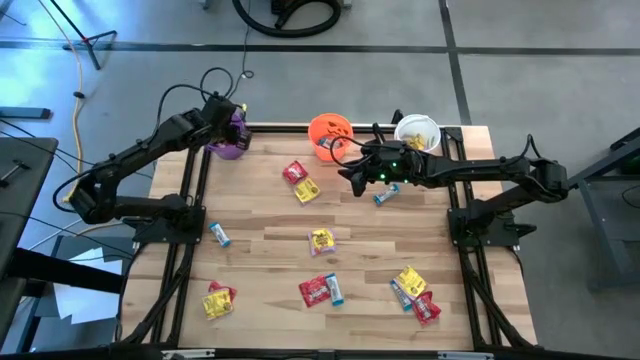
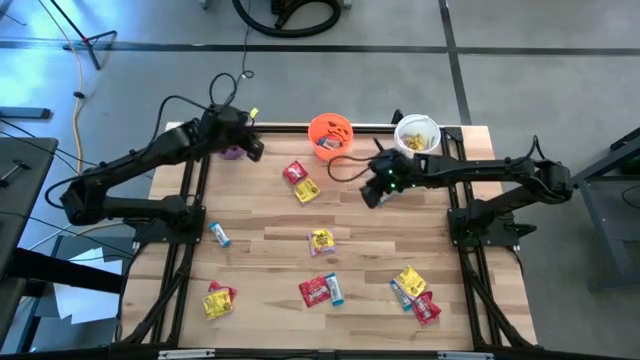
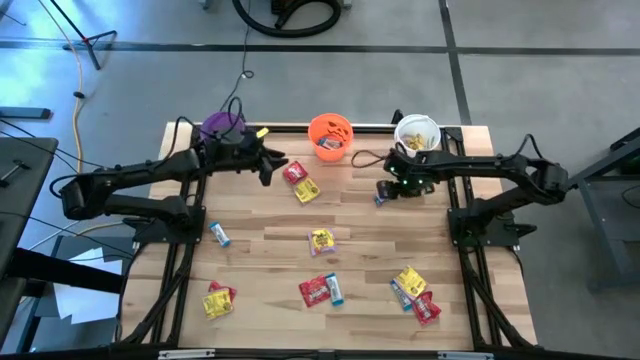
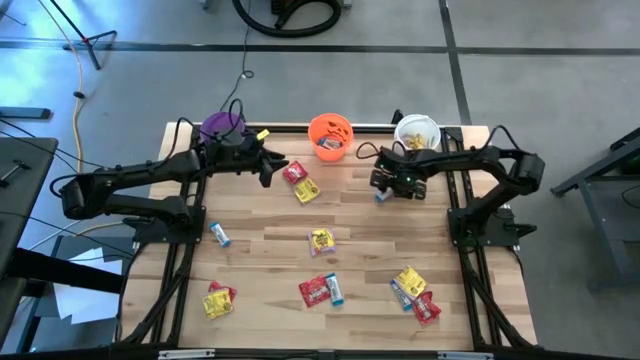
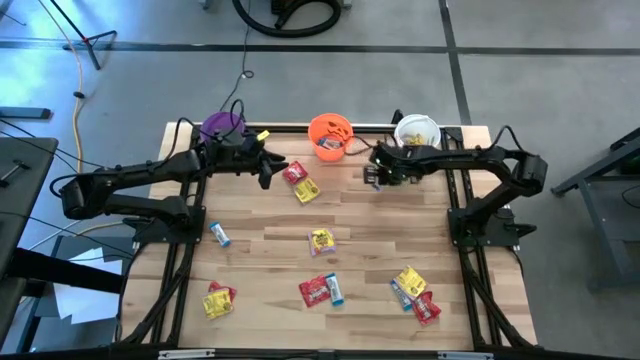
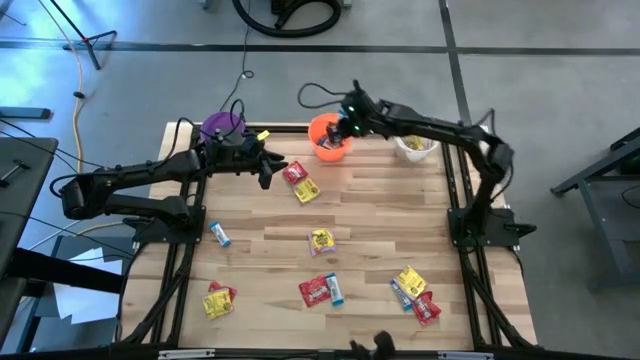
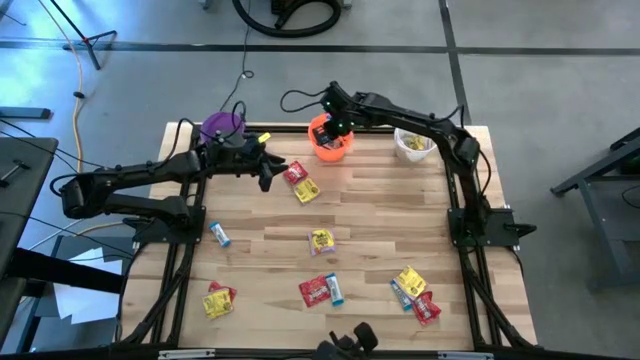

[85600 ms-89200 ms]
Task: Organize candy in baskets
Put the white chocolate into the orange bucket

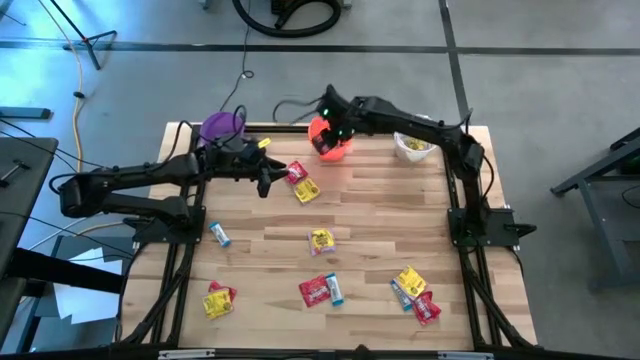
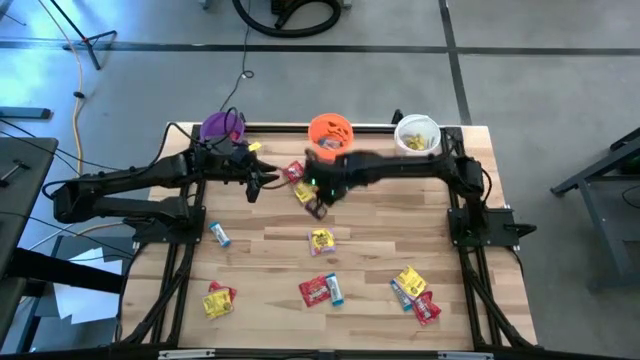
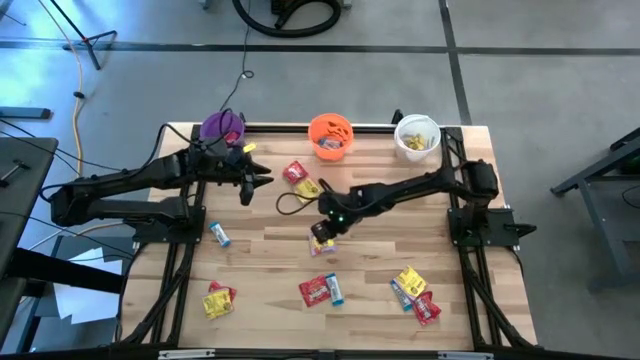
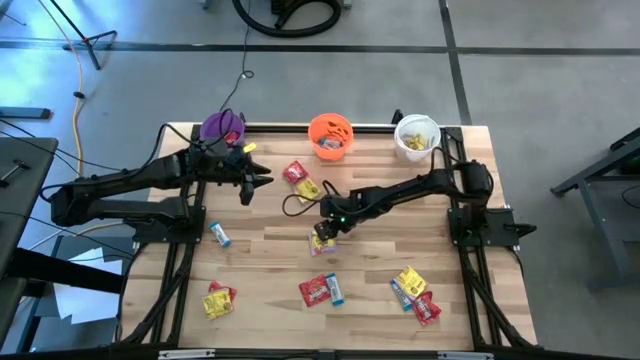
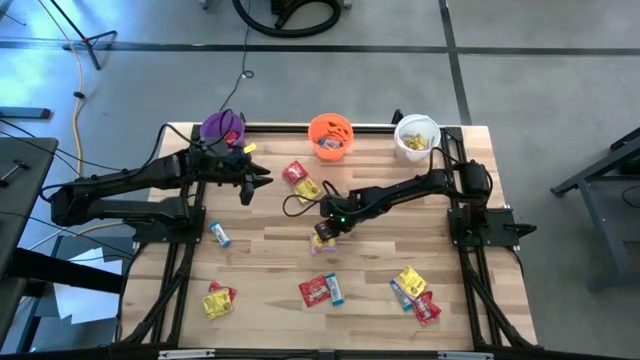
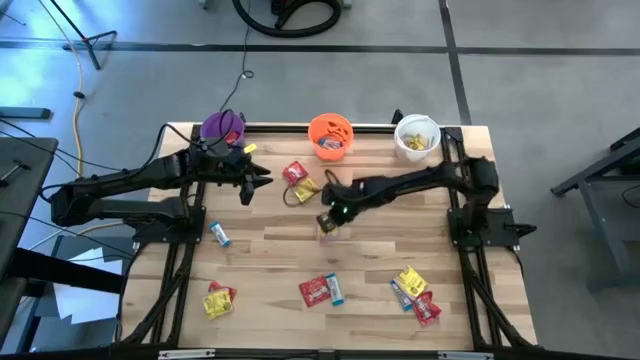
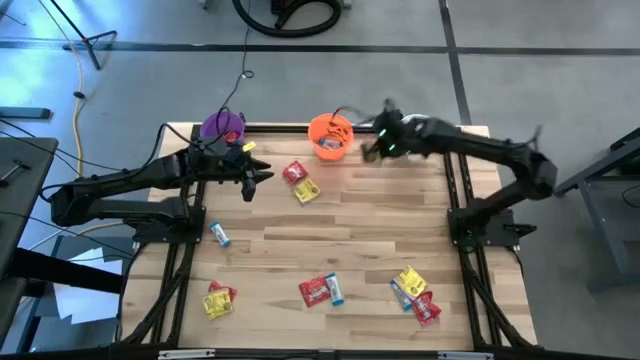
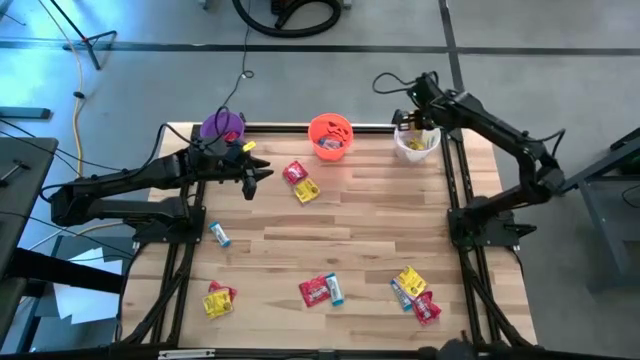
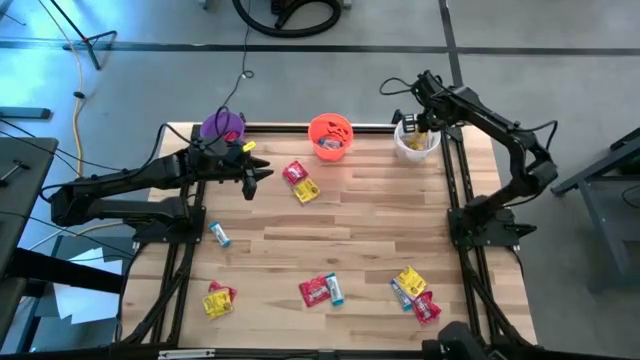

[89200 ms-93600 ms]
Put the yellow candy into the white bucket

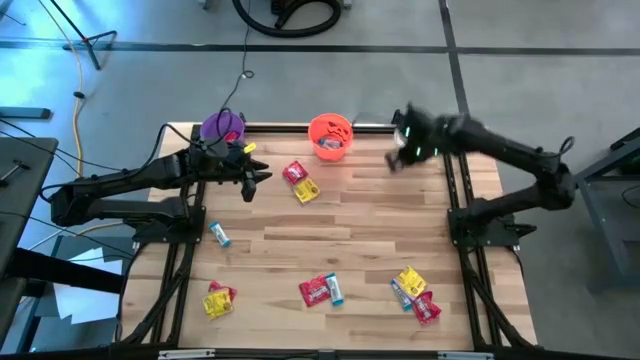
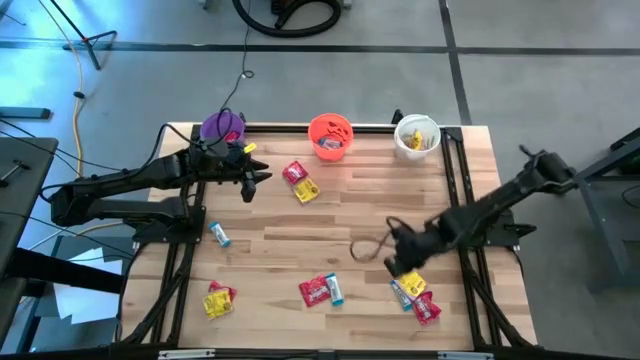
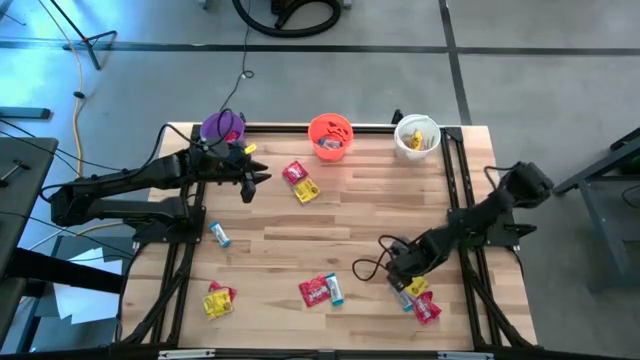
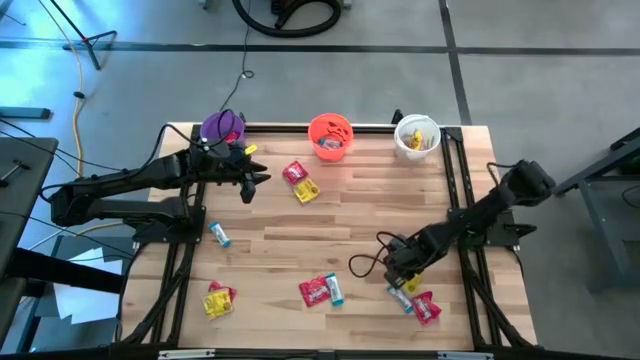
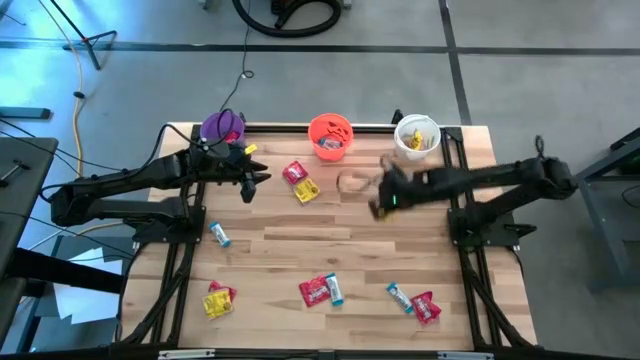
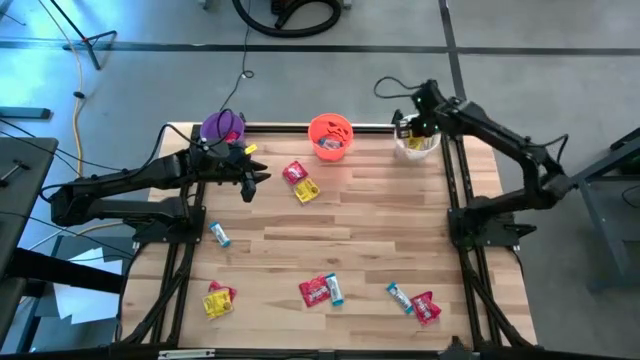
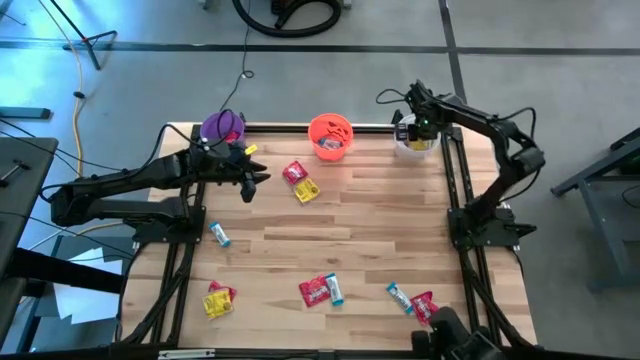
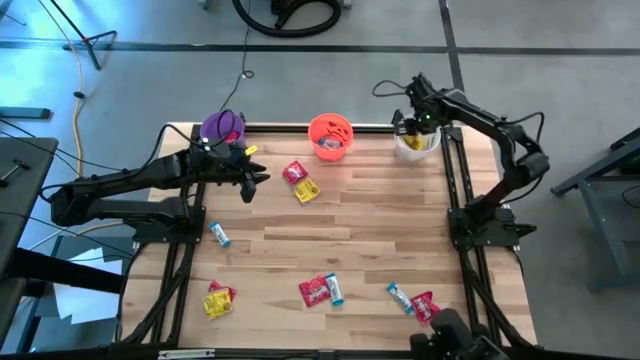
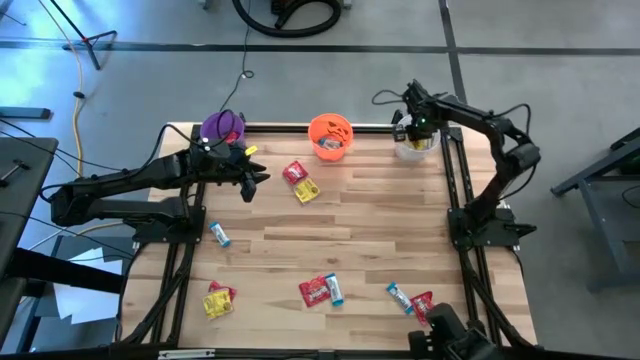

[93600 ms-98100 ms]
Put the yellow candy into the white bucket

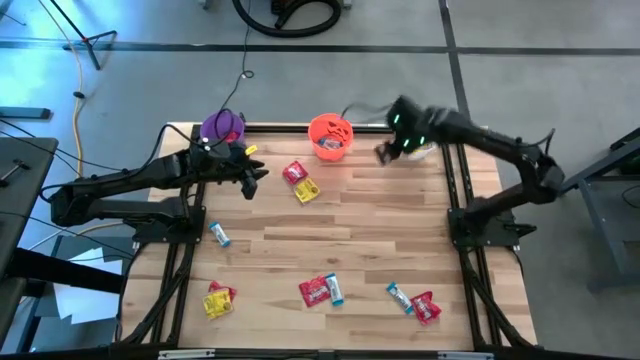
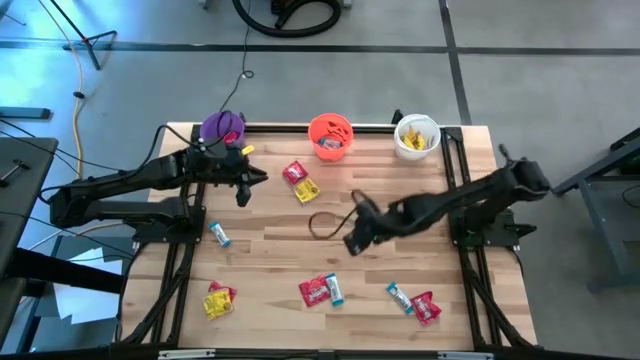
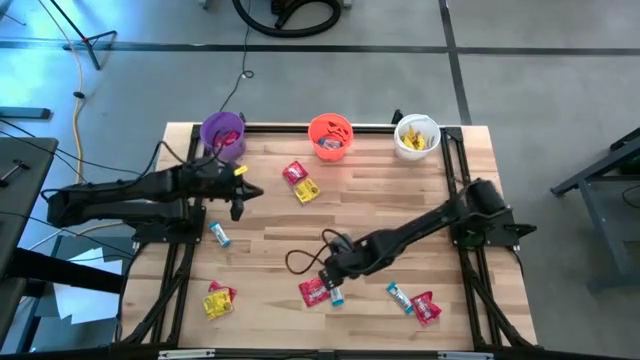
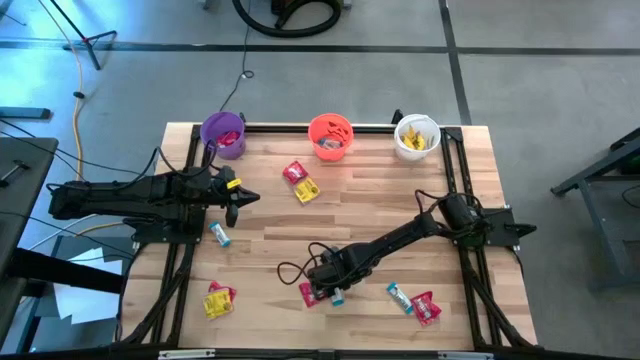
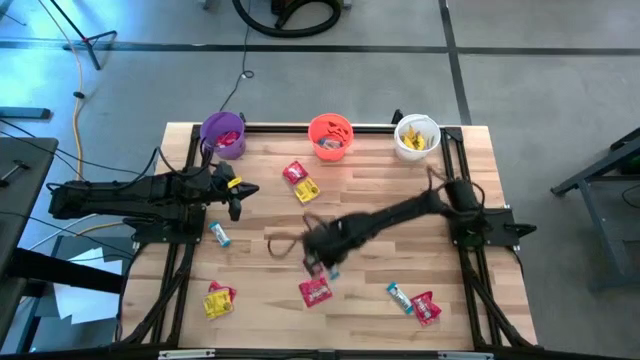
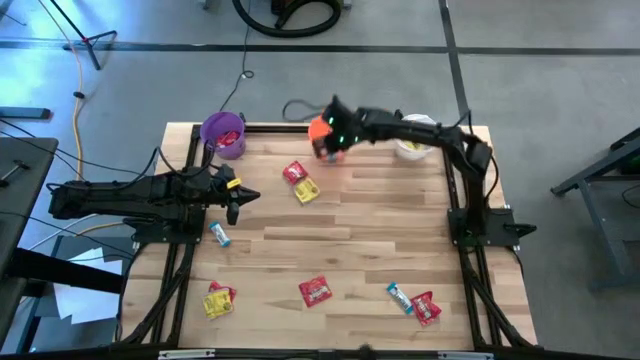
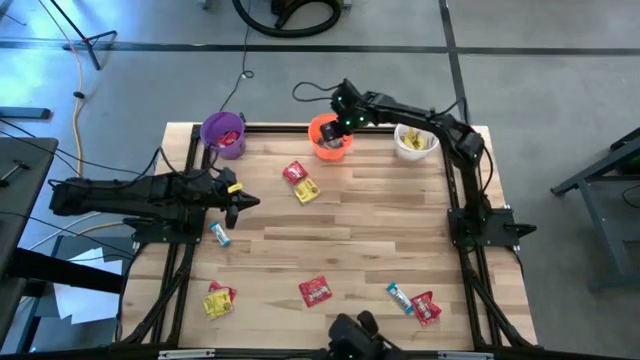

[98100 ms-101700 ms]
Put the white chocolate into the orange bucket

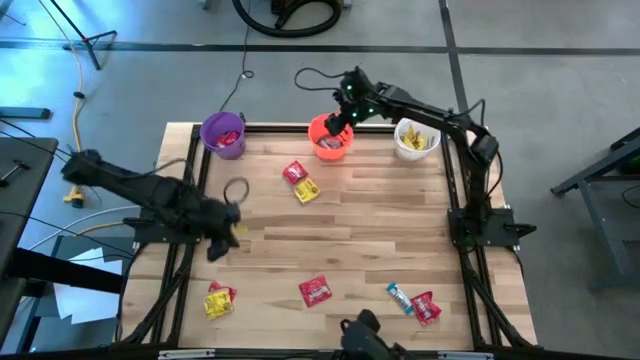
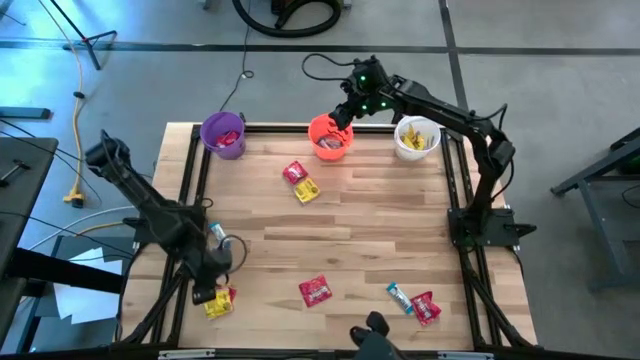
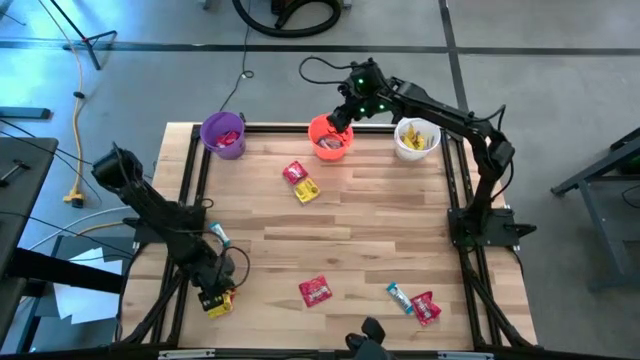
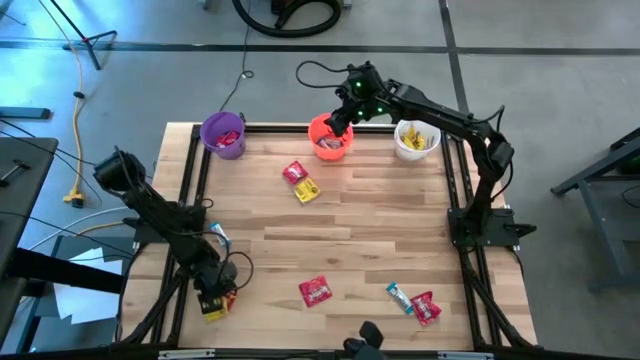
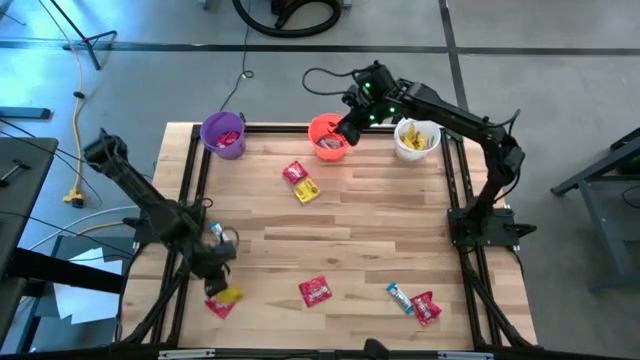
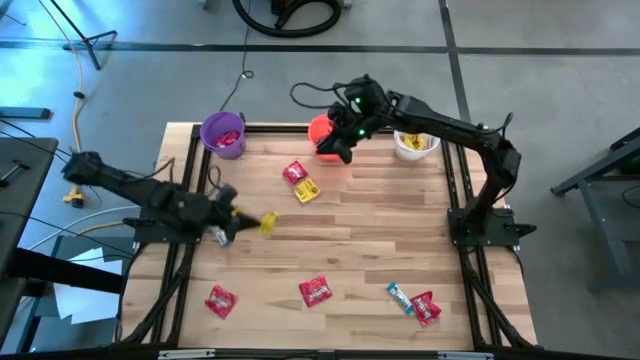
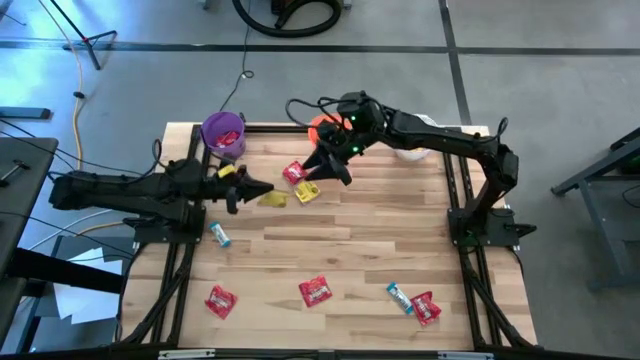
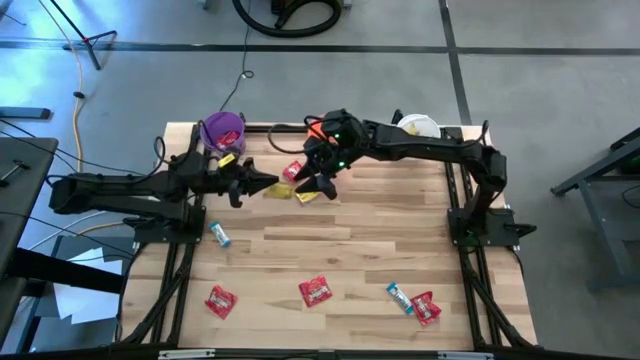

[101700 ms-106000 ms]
Put the yellow candy into the white bucket
